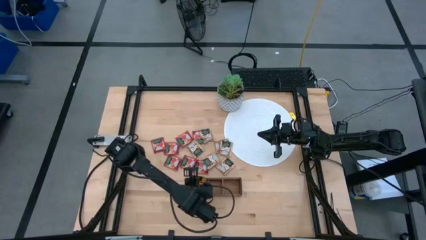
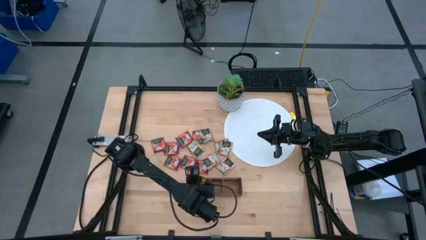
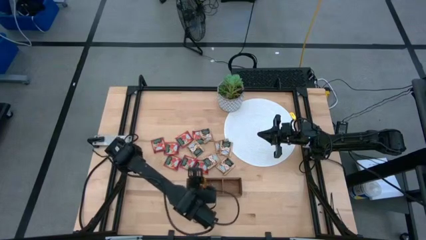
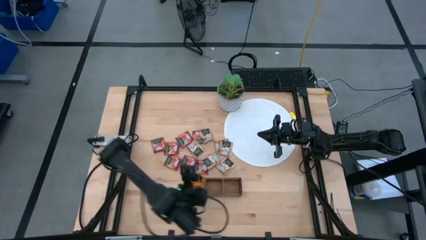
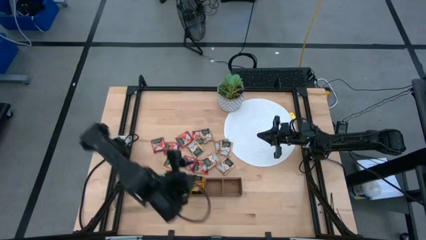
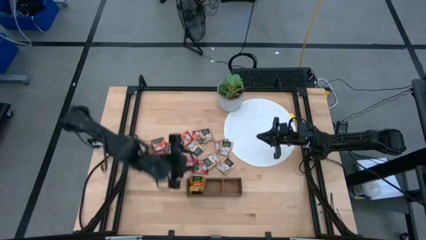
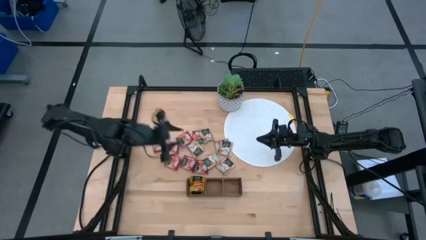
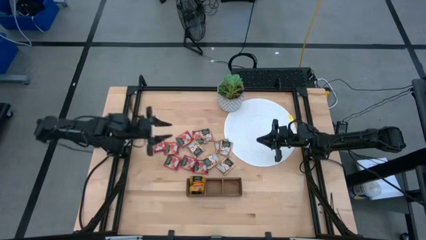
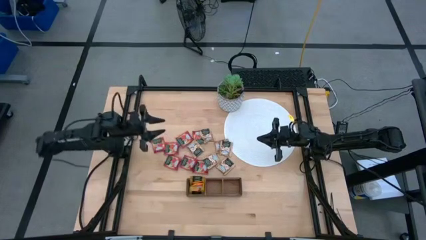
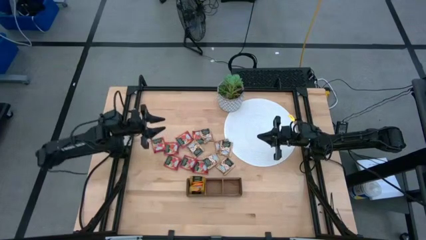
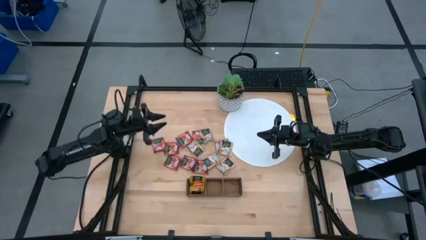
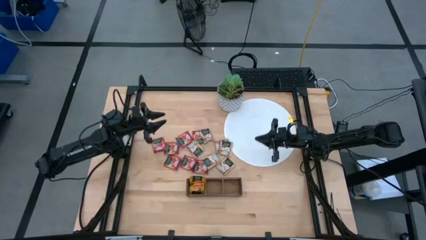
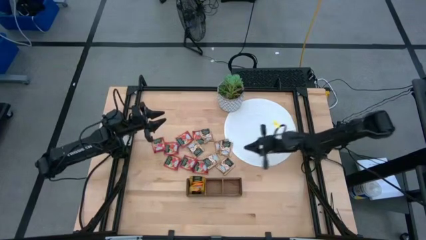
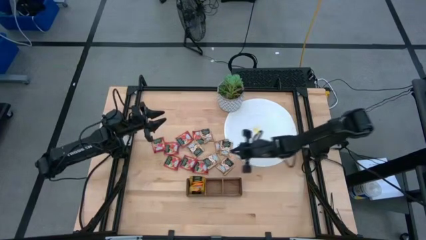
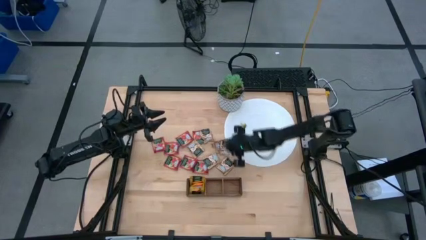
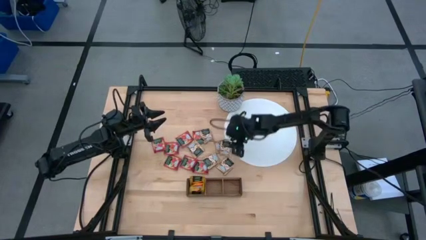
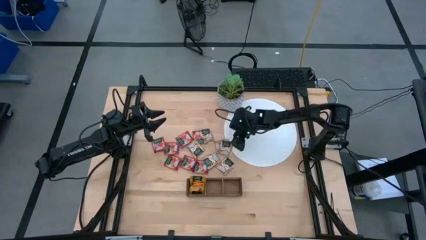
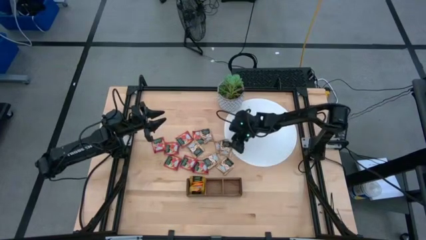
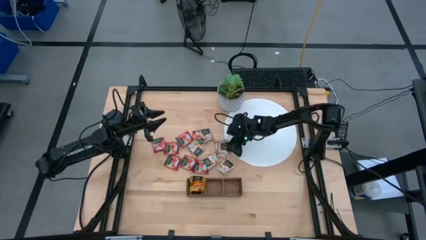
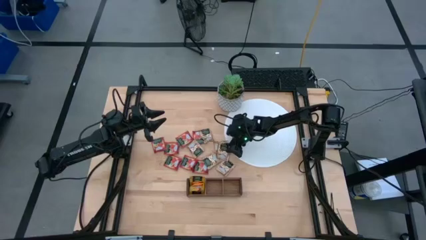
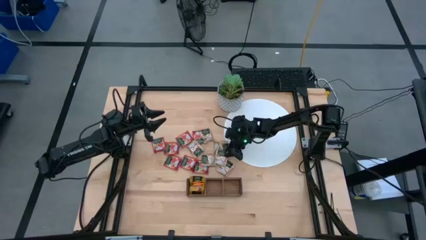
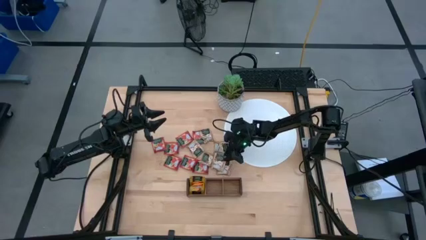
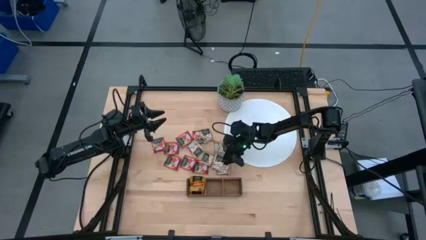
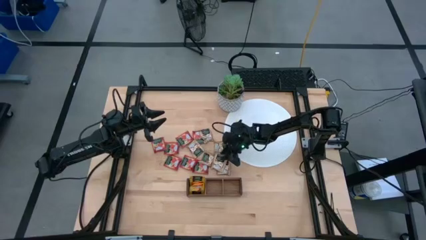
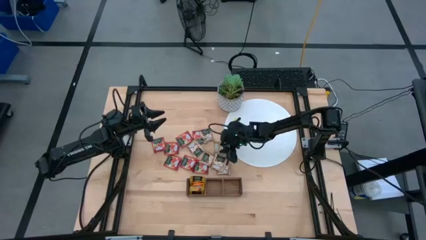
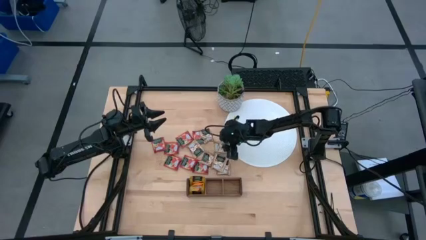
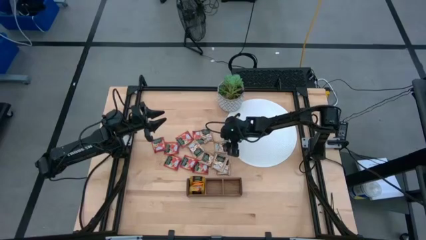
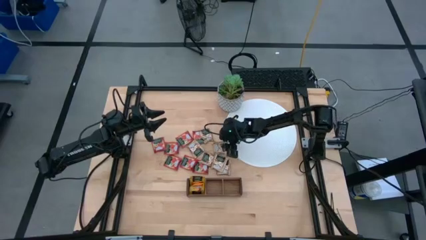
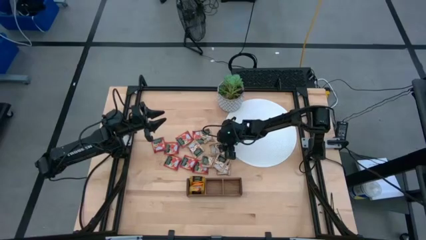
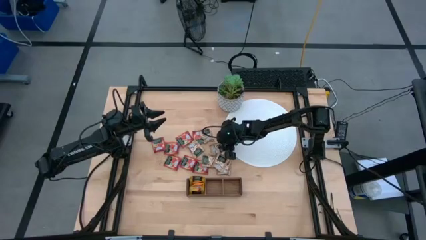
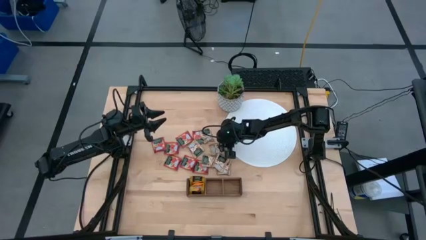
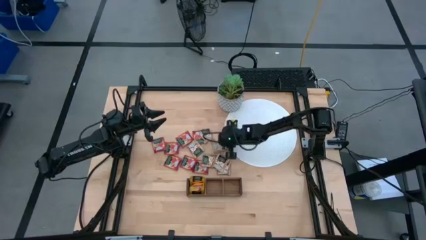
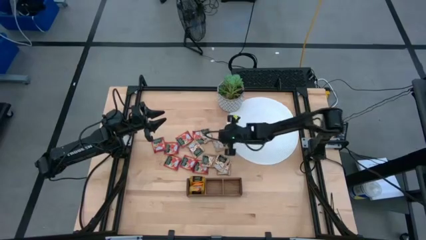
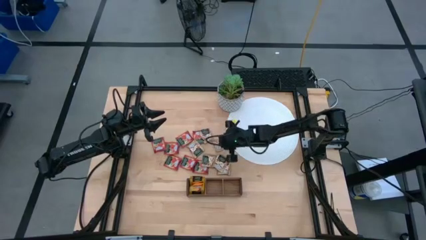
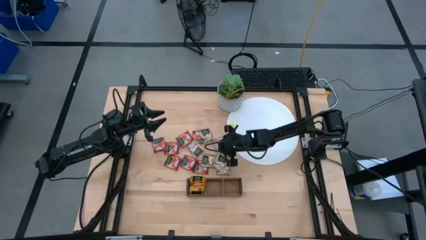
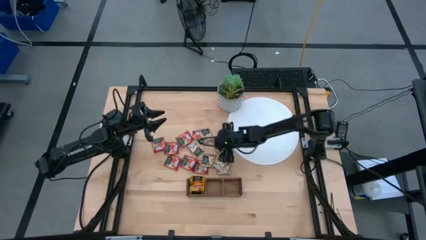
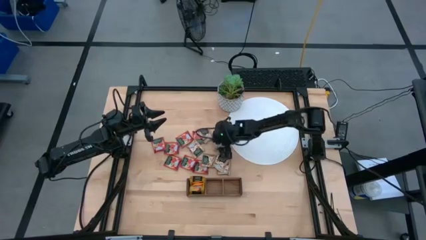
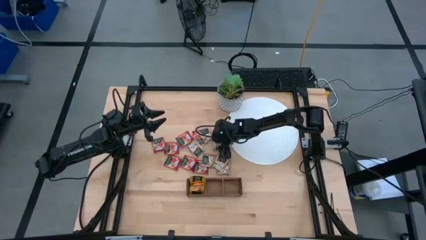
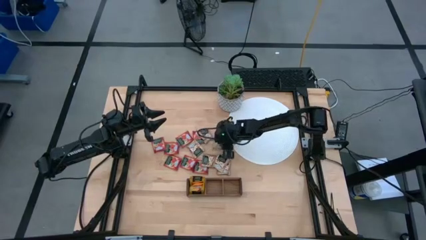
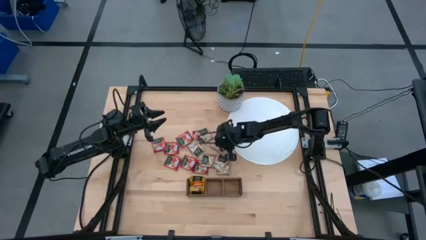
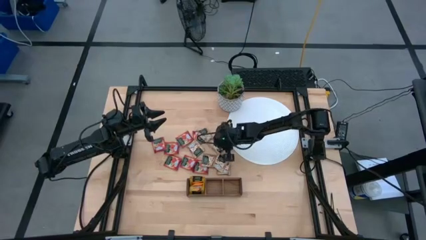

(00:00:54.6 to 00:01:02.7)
Task: Pick & Place Tea
Put the light brown tea bag into the right section of the wooden organizer

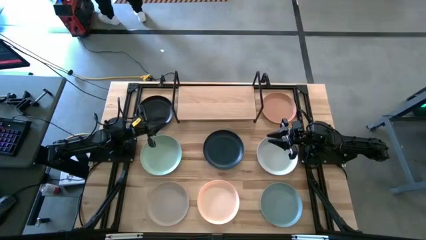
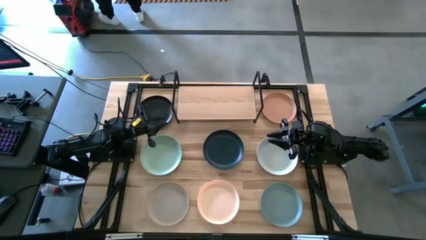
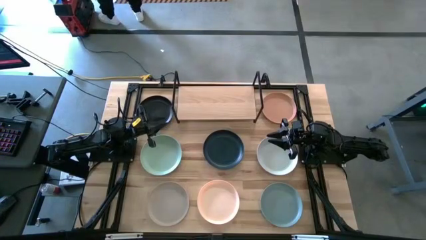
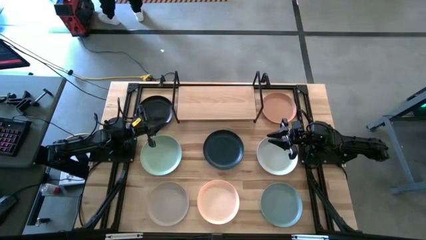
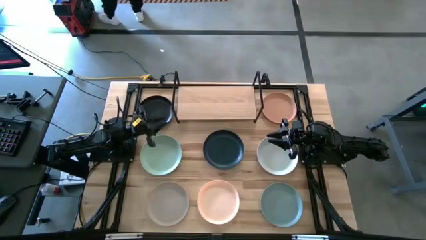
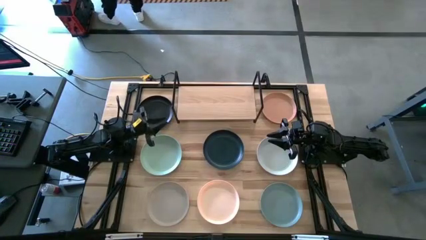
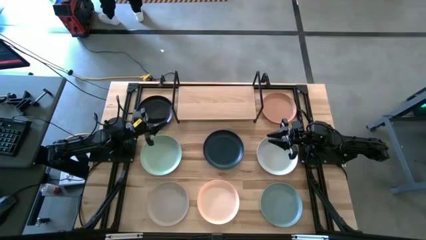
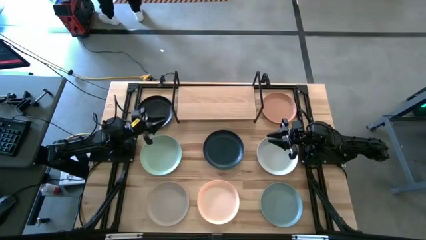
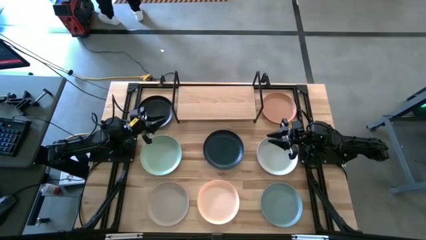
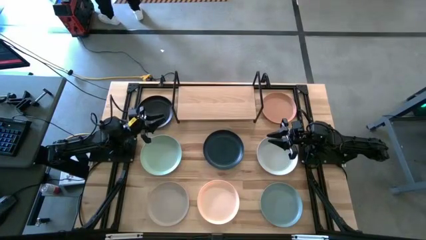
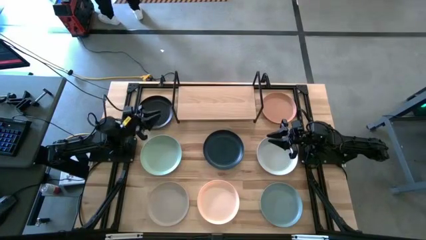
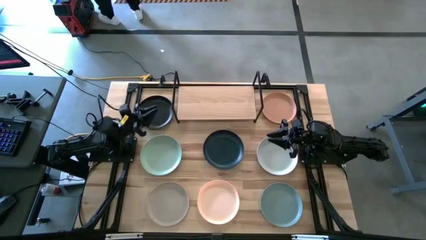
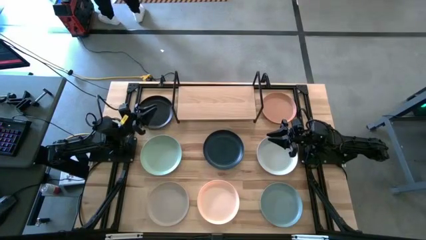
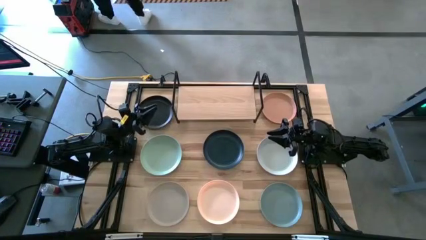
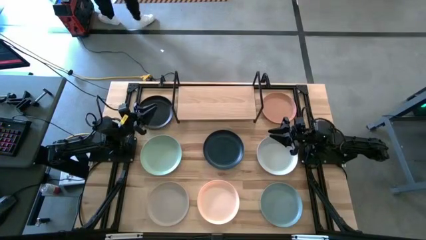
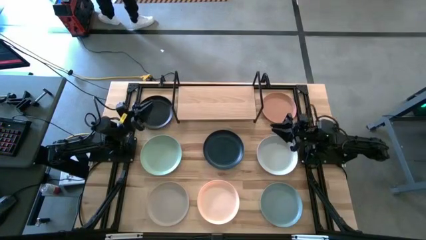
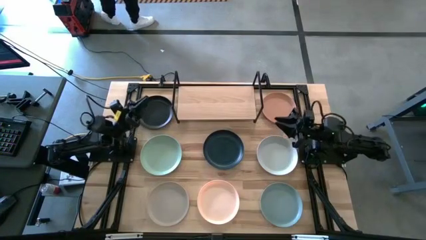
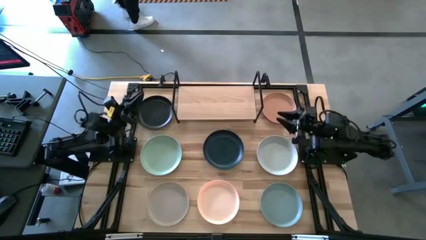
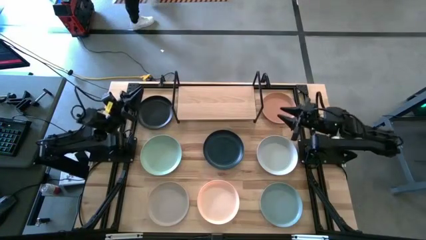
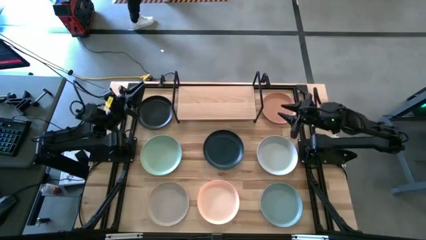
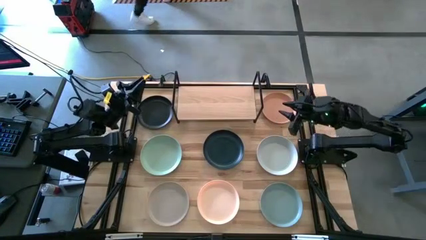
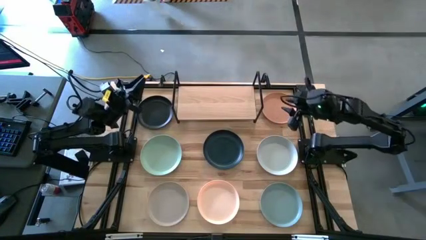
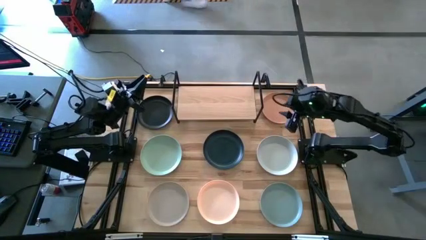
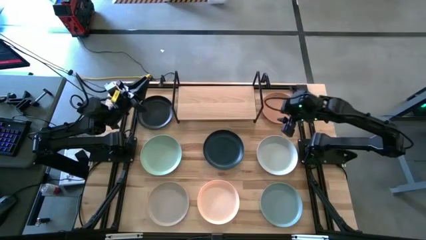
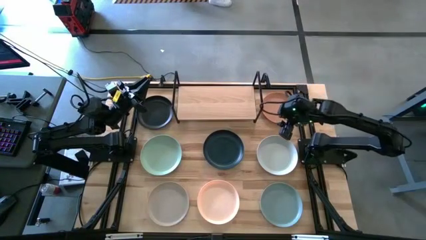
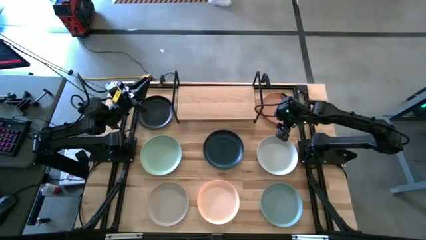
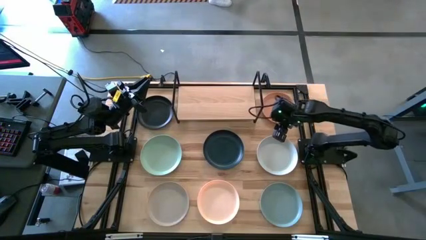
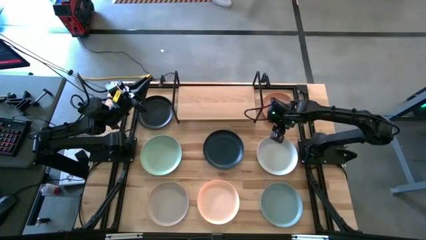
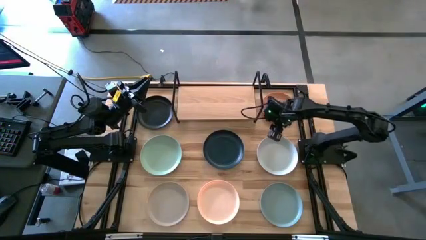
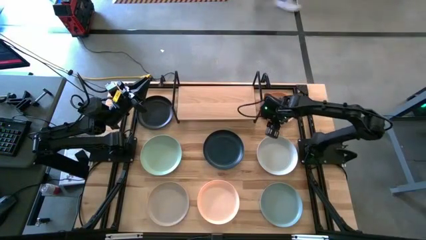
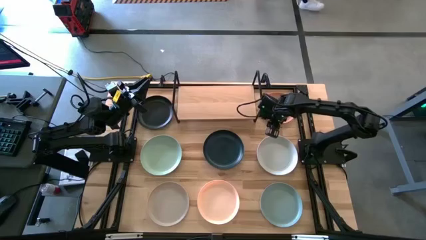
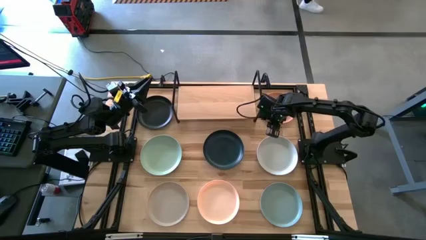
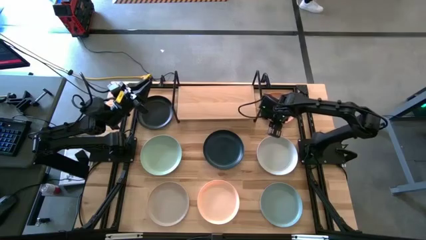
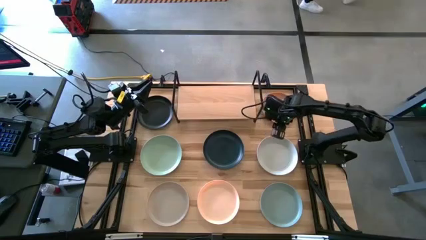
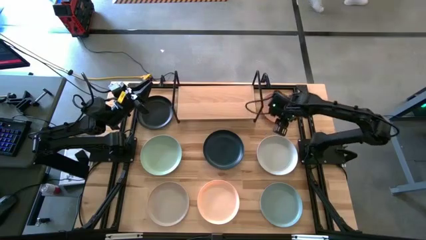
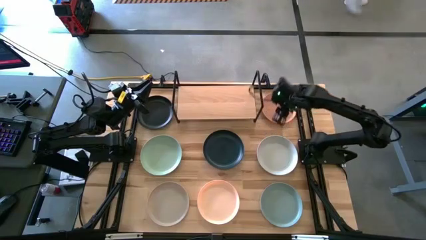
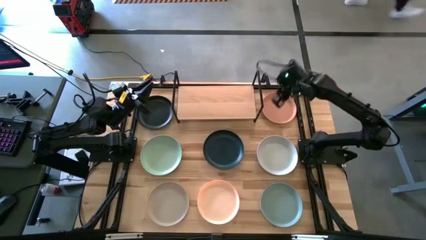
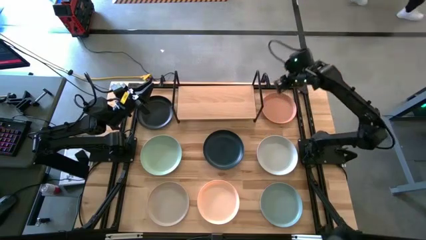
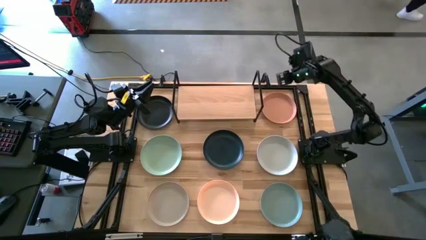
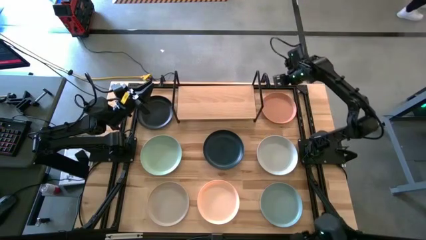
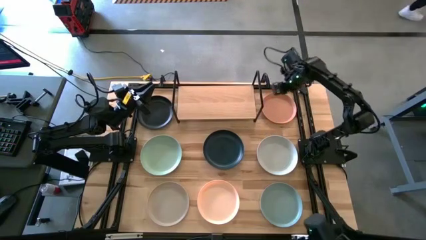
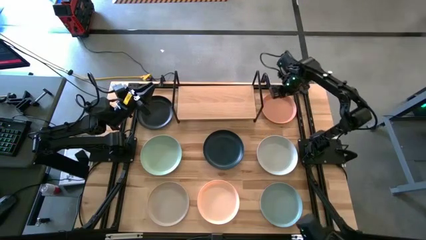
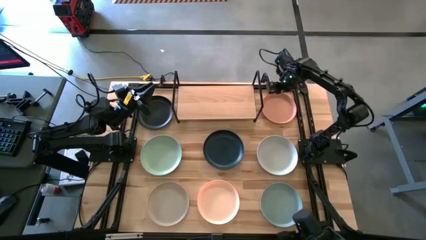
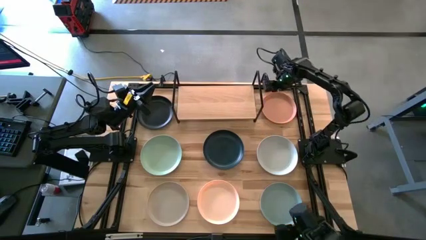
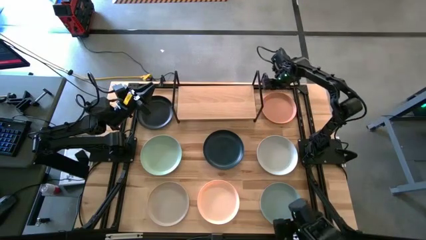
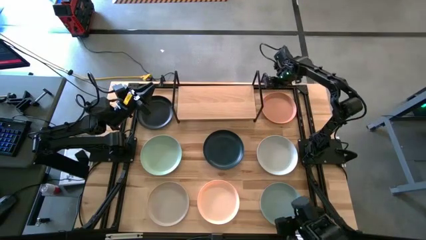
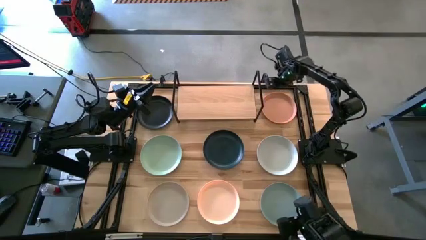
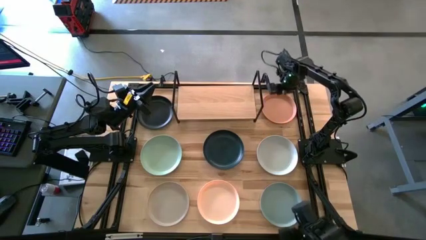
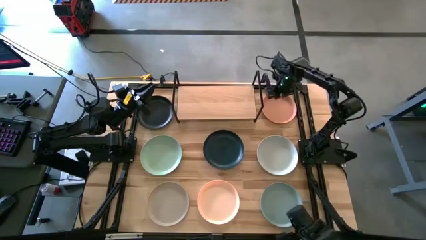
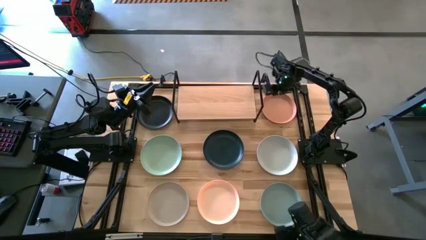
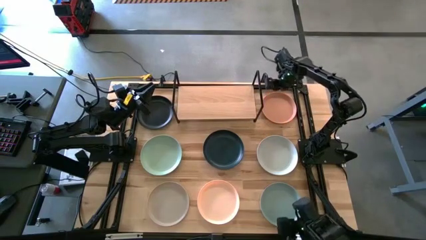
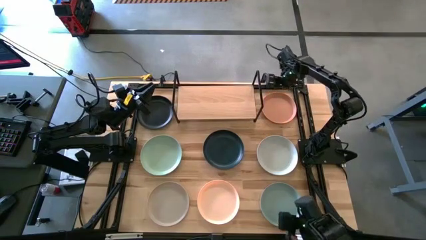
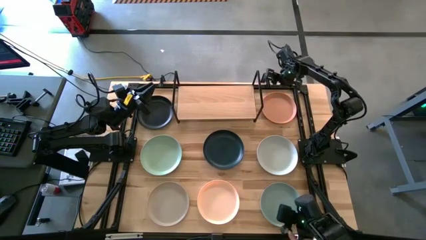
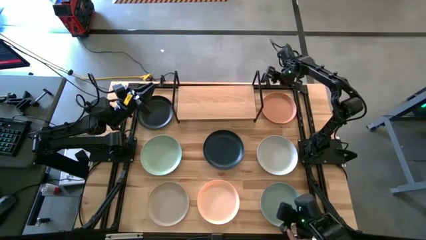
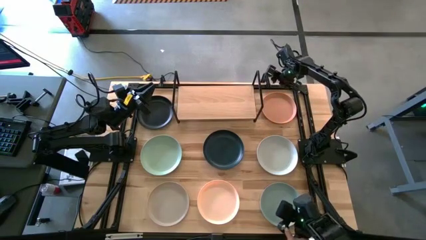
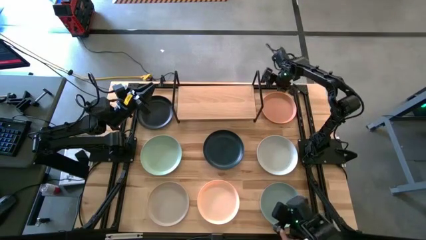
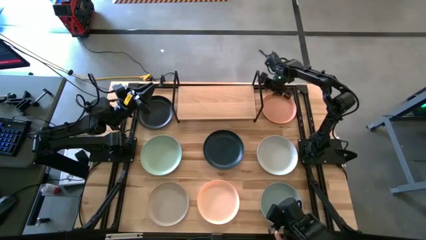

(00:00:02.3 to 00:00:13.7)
Task: Place and stack plates onto a shelf
Put the brown plate on the shelf
